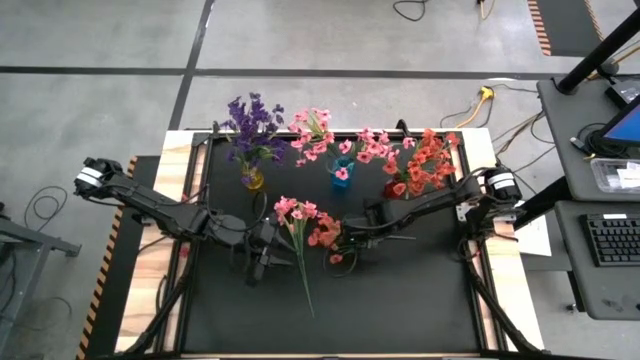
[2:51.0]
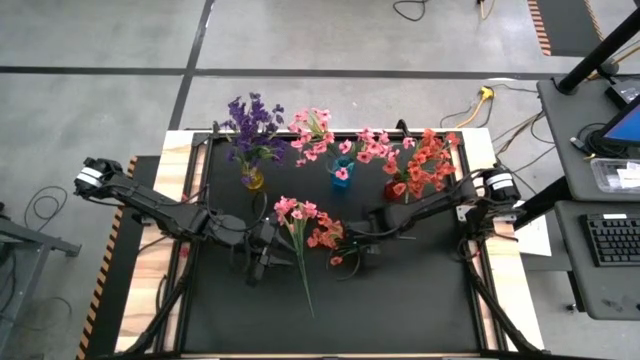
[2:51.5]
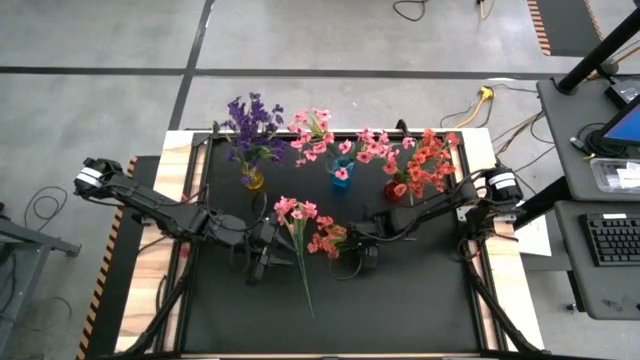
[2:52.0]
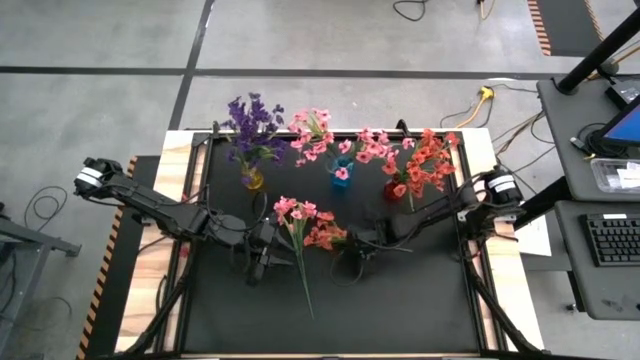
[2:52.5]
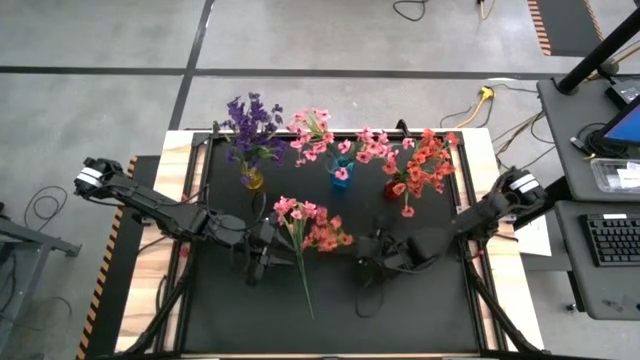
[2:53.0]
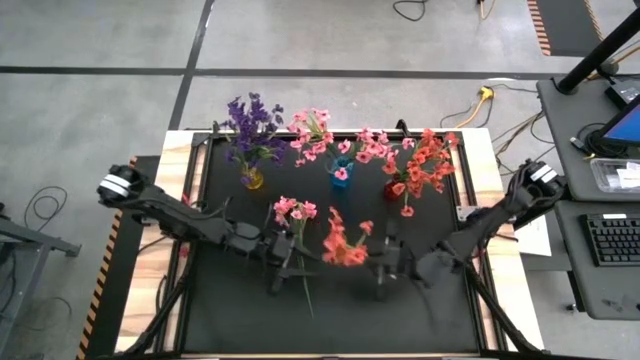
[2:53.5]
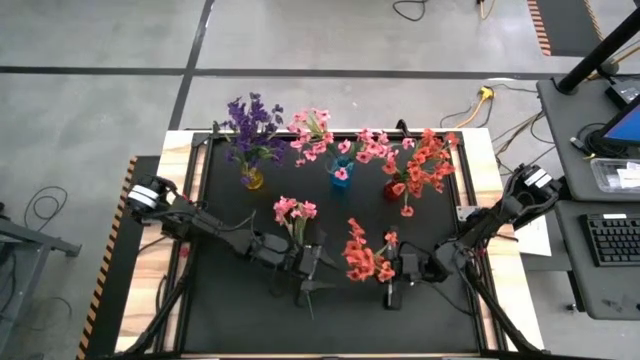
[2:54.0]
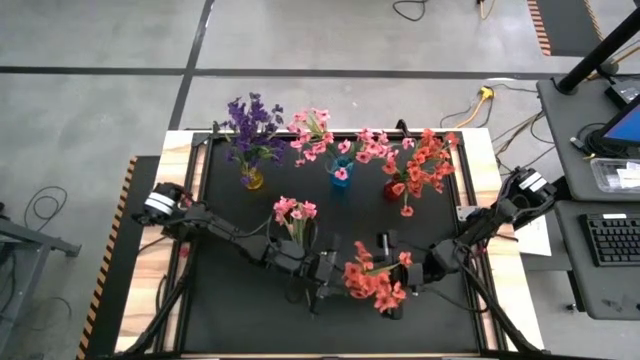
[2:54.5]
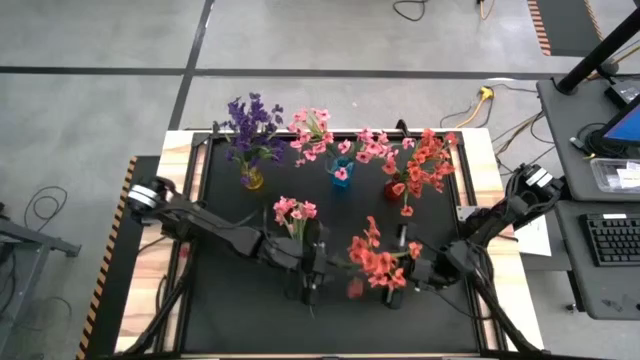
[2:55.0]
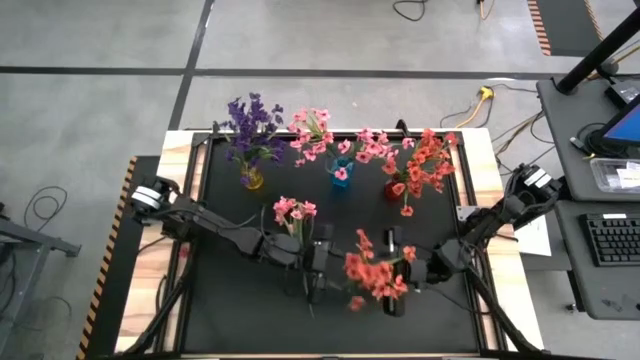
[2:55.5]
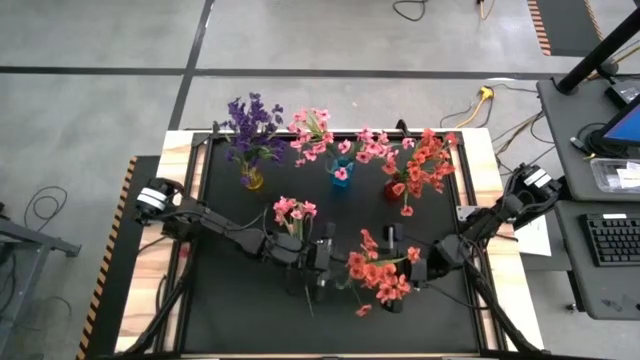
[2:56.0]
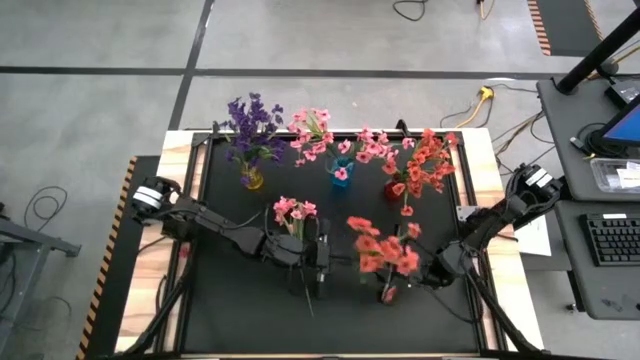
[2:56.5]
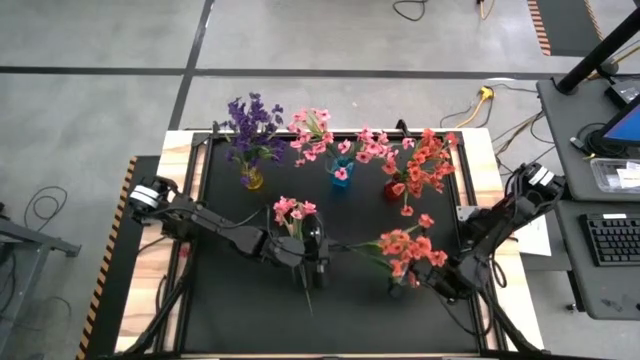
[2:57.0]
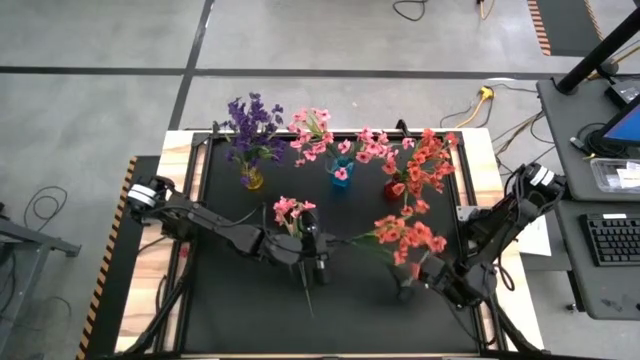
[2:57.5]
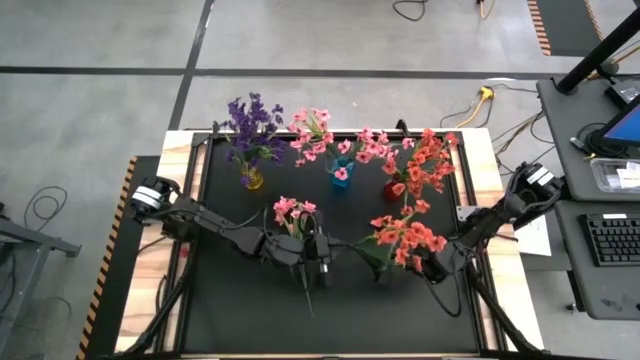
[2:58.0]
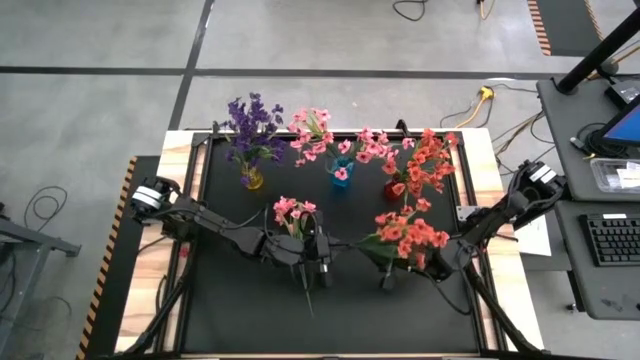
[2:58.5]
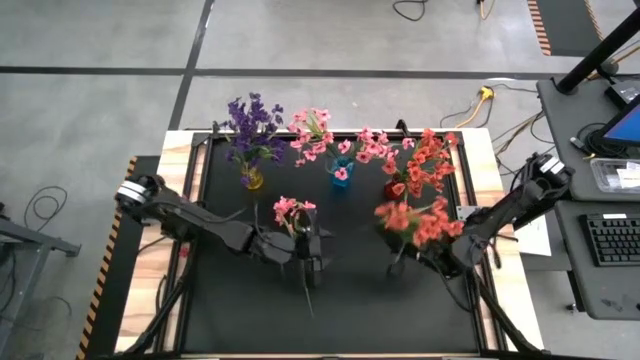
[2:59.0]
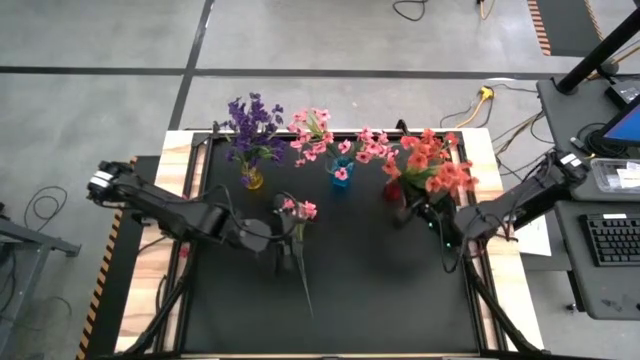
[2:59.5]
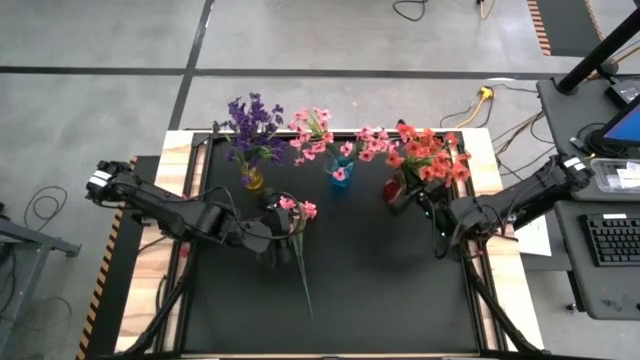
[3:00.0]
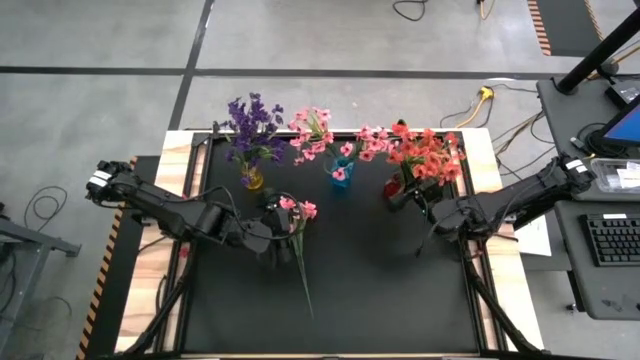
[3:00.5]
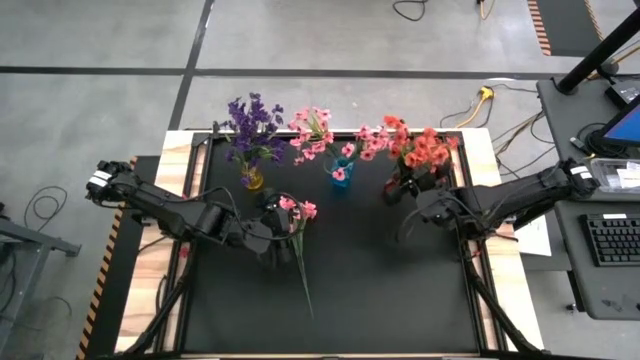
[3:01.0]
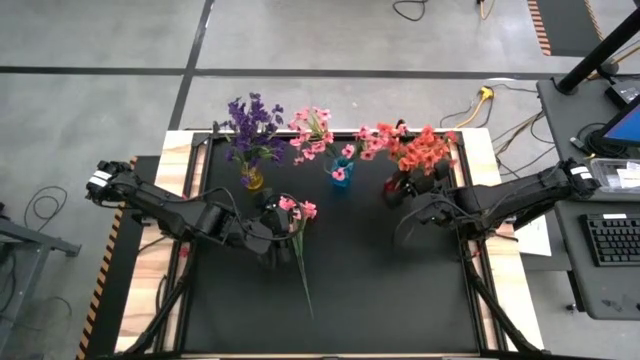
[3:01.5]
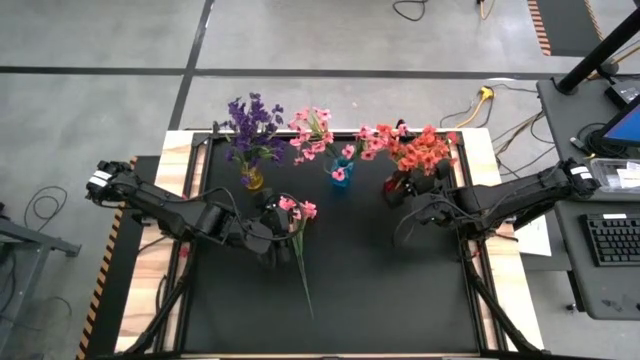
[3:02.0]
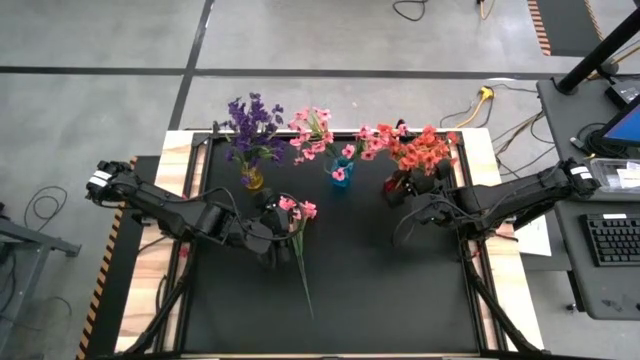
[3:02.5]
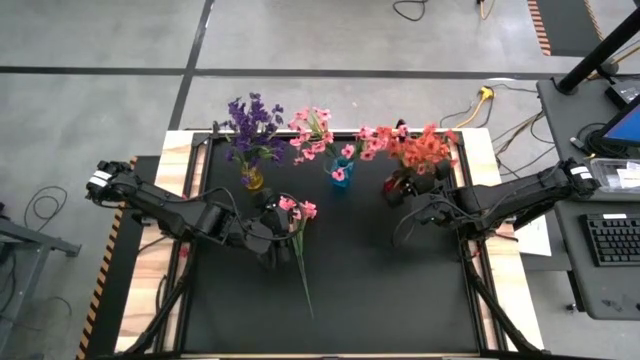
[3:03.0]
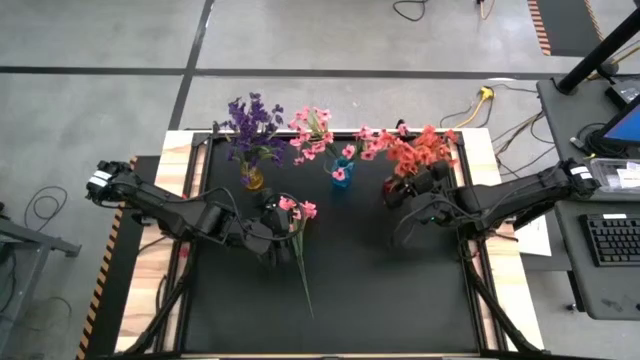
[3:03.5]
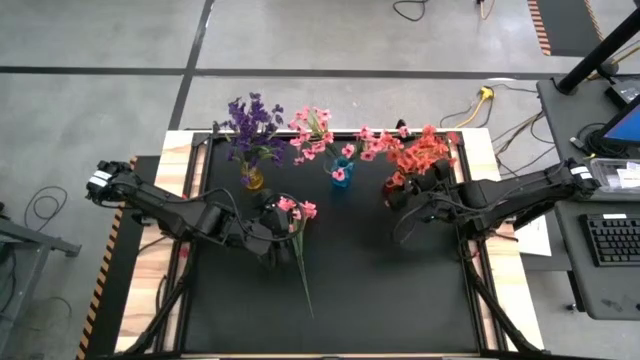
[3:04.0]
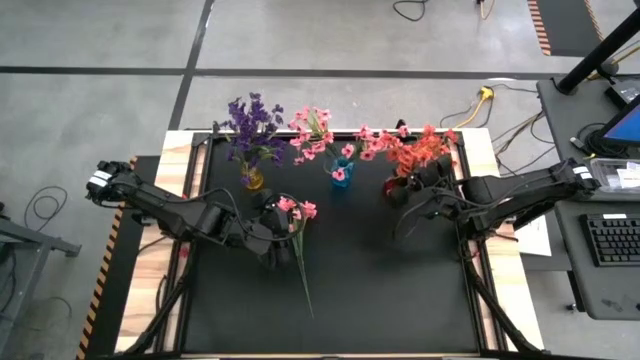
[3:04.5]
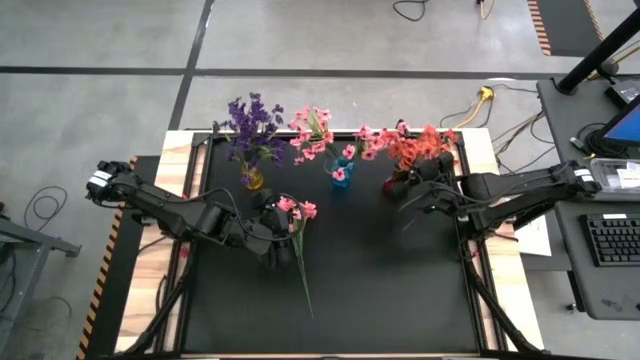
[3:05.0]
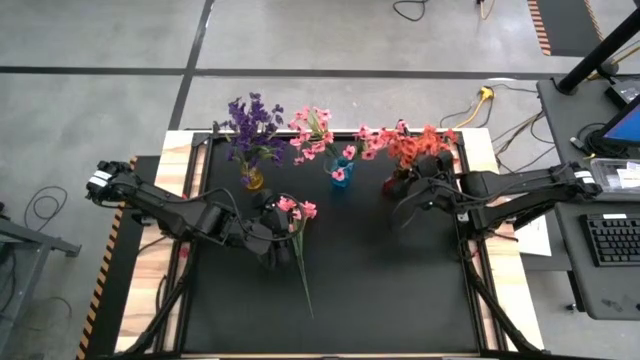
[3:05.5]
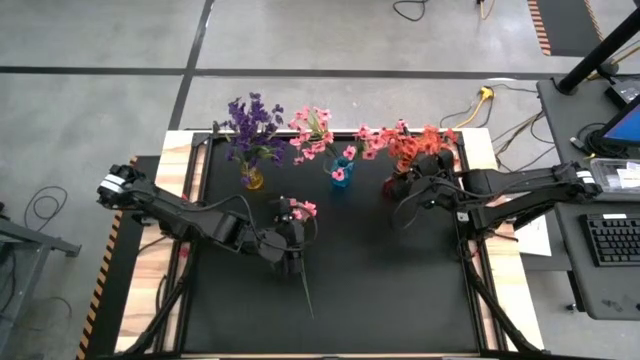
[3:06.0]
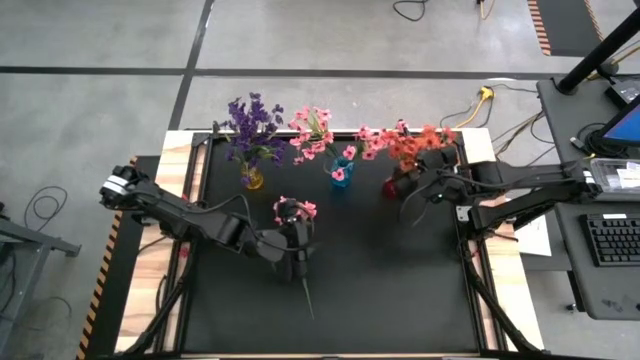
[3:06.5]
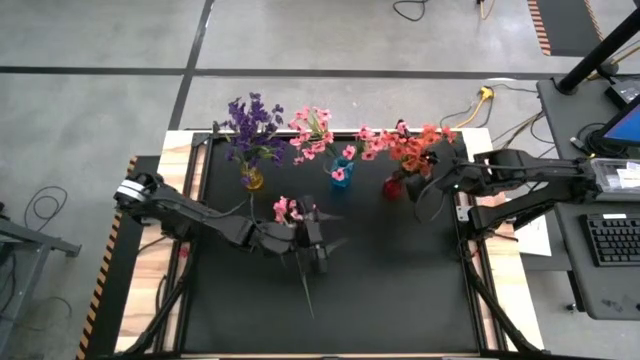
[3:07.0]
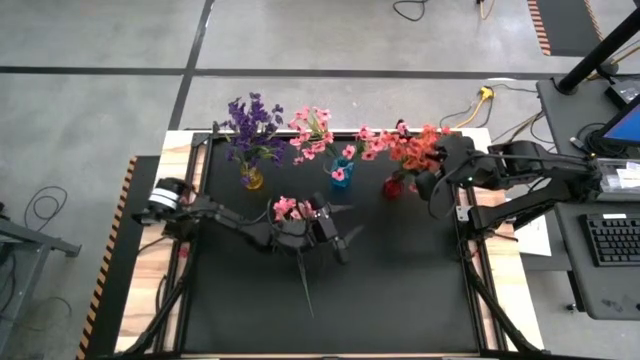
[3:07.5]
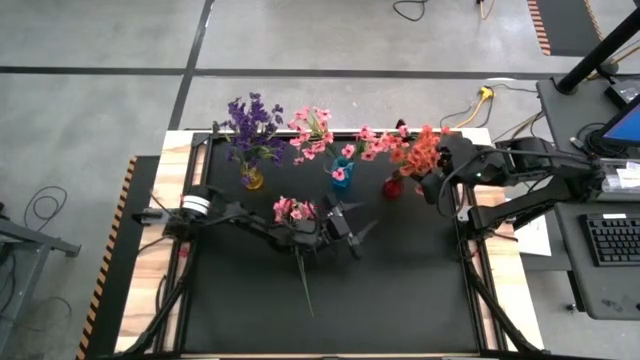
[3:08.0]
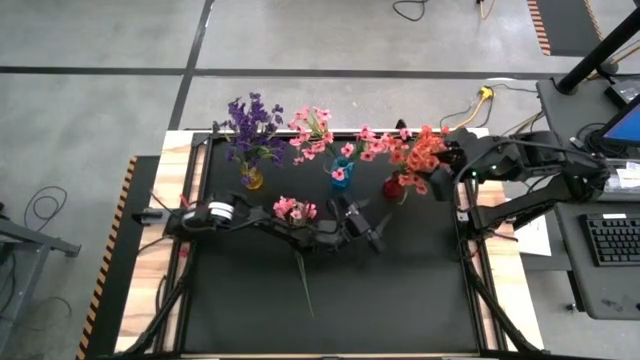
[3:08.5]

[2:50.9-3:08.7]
Task: Sort flowers into vase by color
Put the orange flower into the red vase

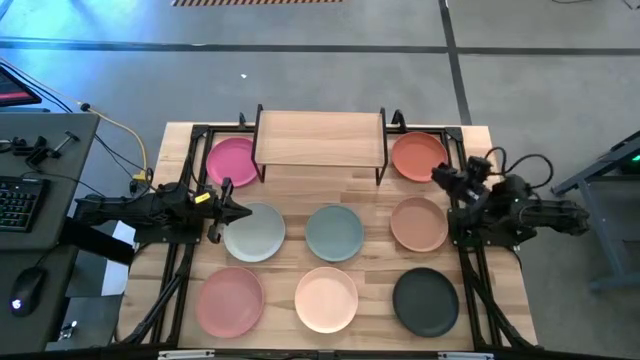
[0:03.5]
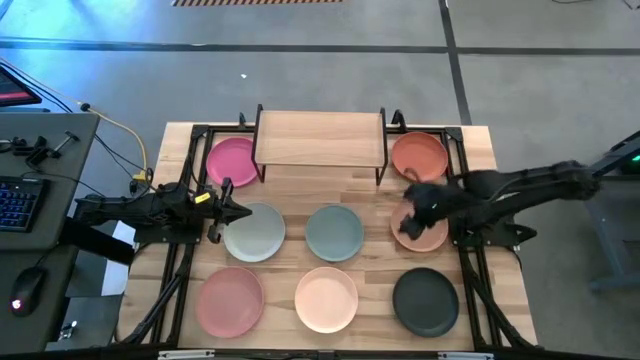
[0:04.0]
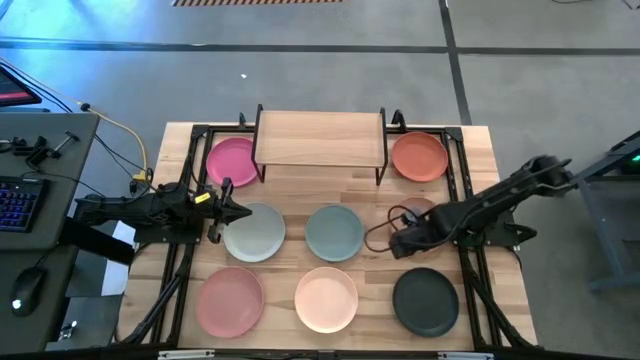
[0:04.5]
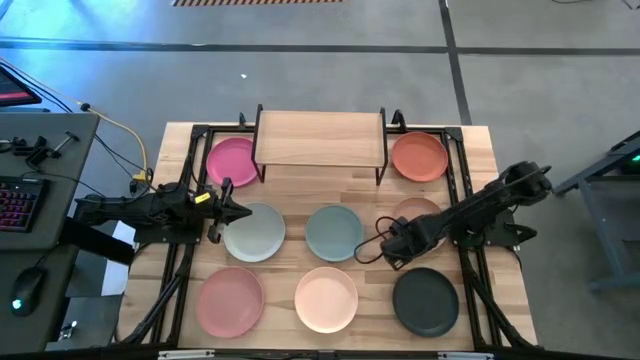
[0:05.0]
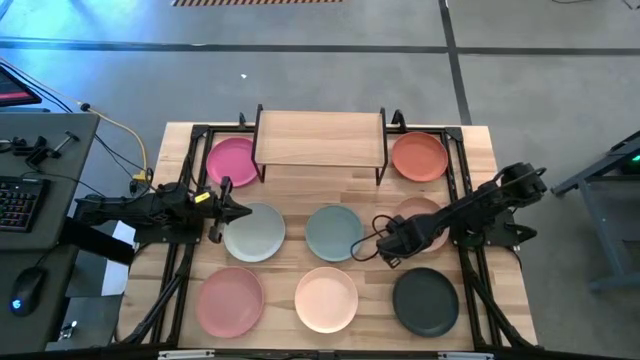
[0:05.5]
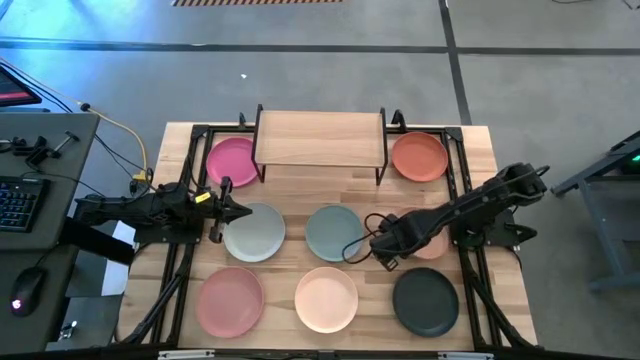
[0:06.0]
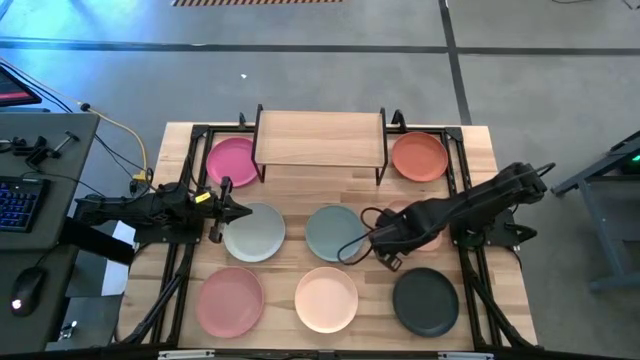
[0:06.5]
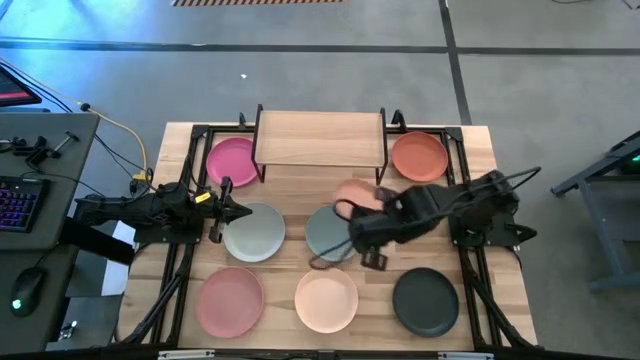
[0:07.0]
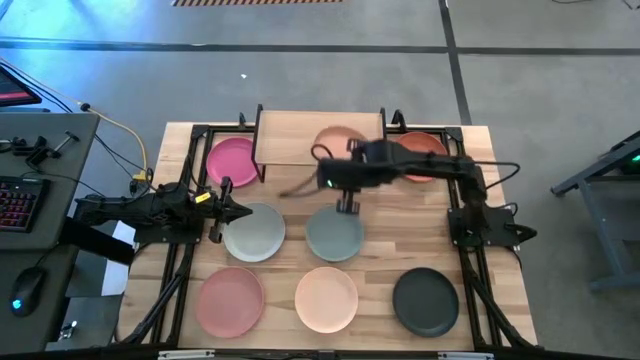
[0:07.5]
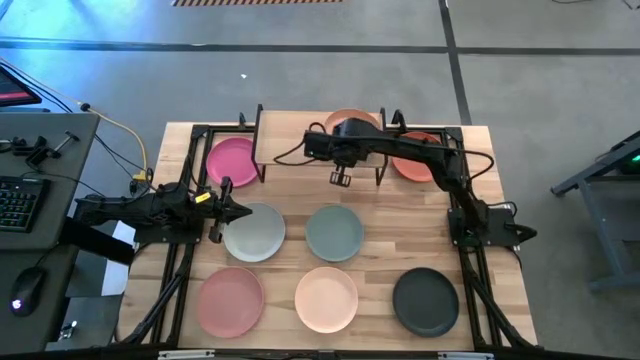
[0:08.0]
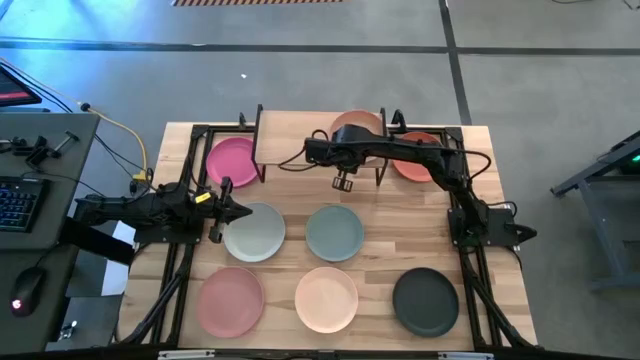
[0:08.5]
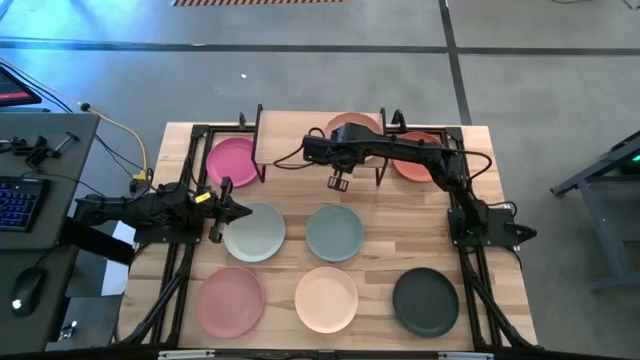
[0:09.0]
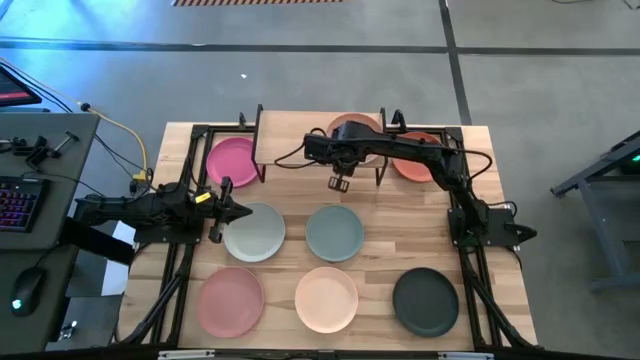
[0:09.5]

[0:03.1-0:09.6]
Task: Place and stack plates onto a shelf
Put the brown plate on the shelf
